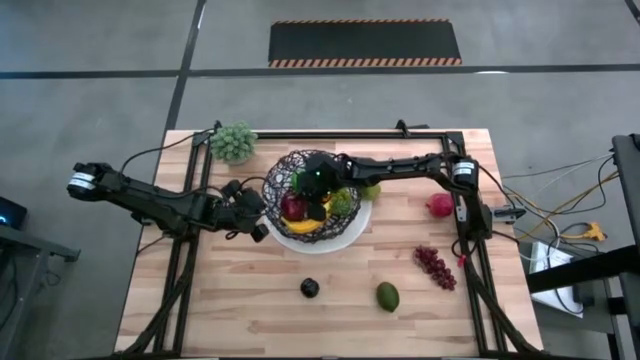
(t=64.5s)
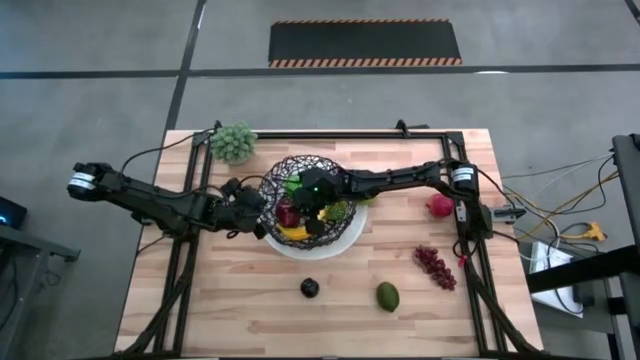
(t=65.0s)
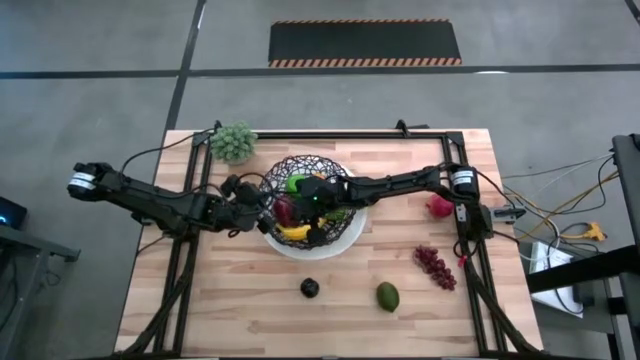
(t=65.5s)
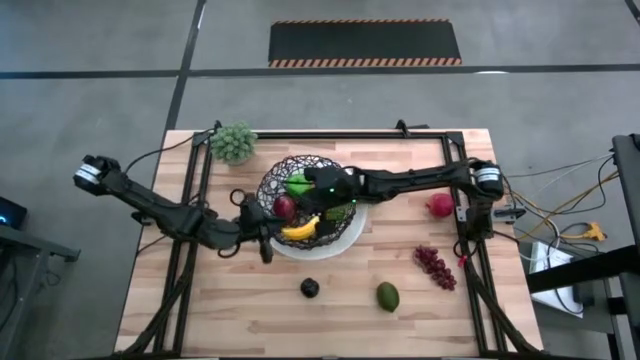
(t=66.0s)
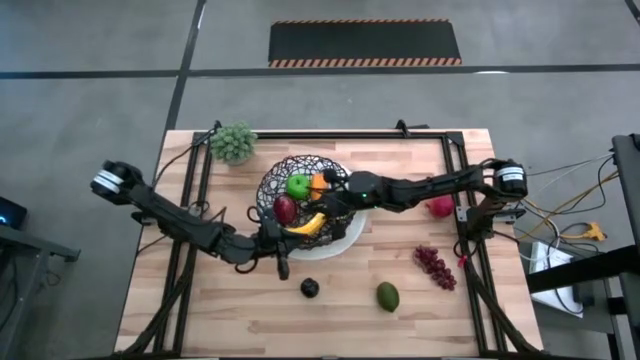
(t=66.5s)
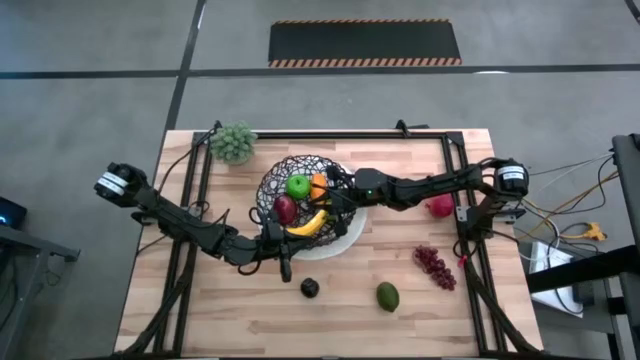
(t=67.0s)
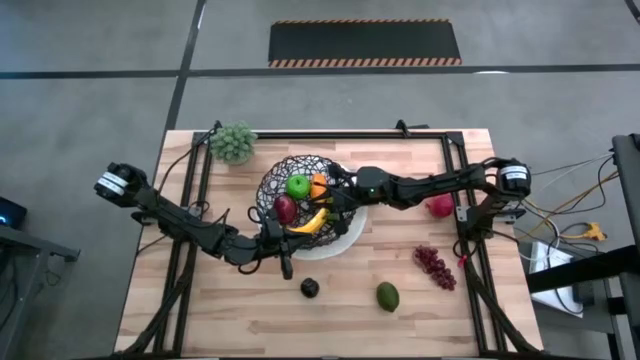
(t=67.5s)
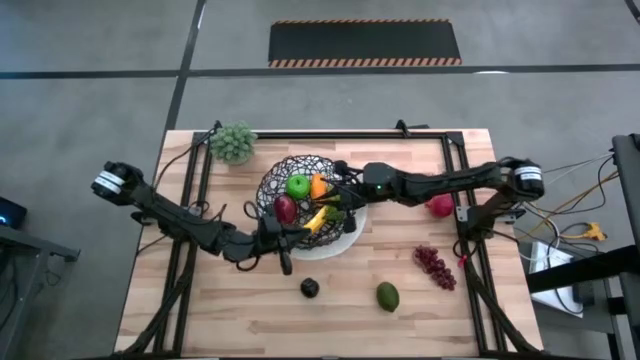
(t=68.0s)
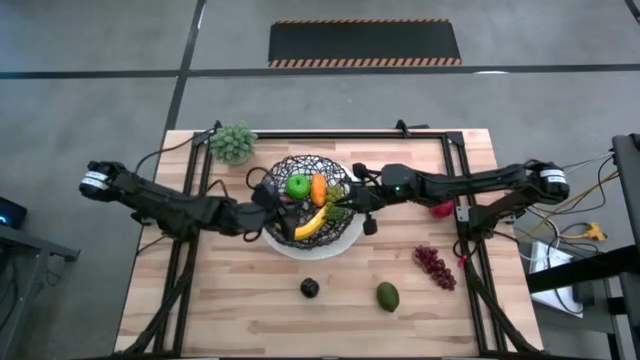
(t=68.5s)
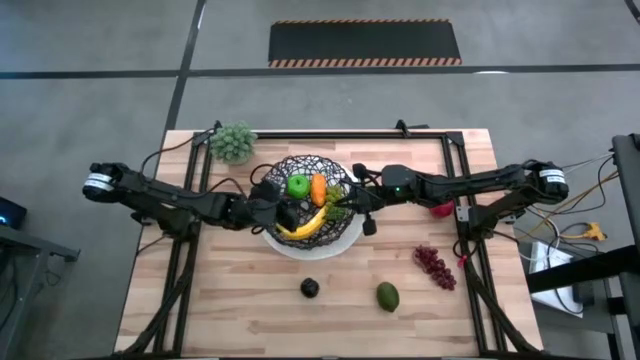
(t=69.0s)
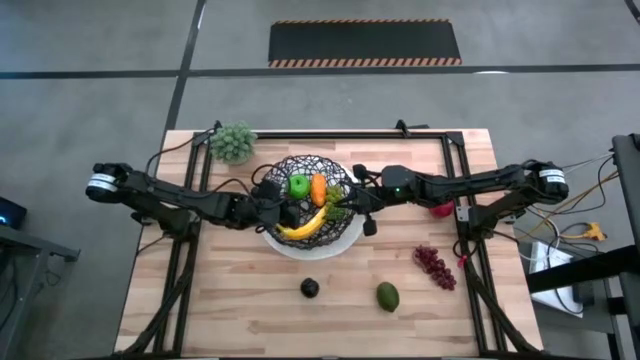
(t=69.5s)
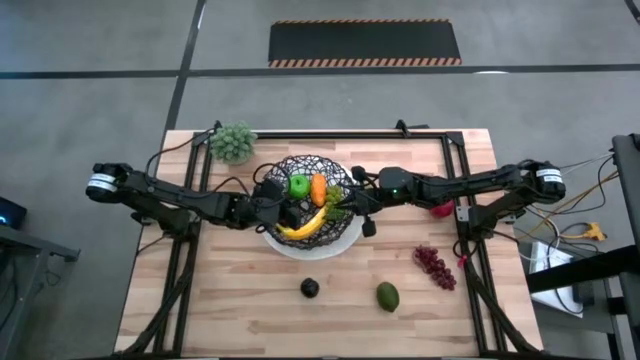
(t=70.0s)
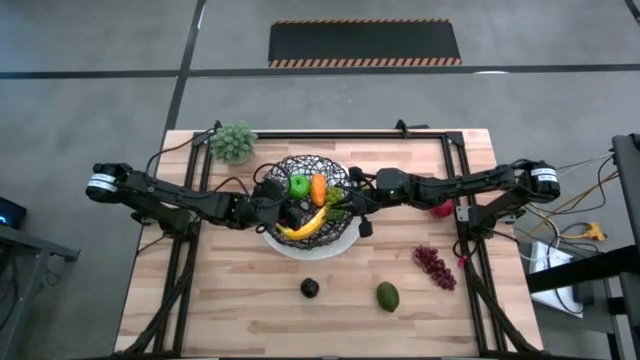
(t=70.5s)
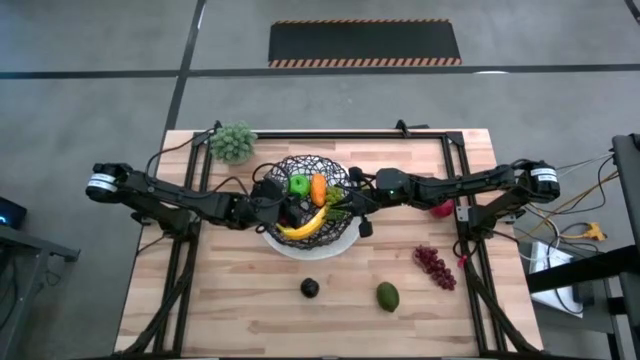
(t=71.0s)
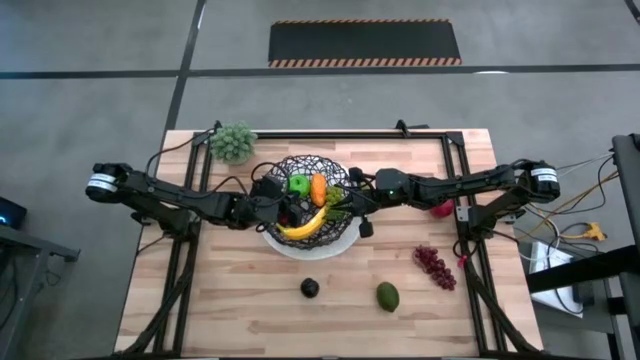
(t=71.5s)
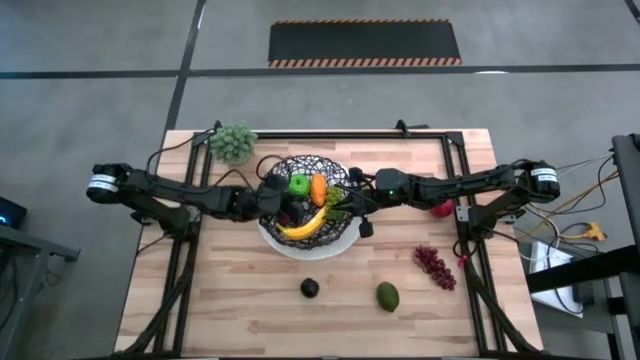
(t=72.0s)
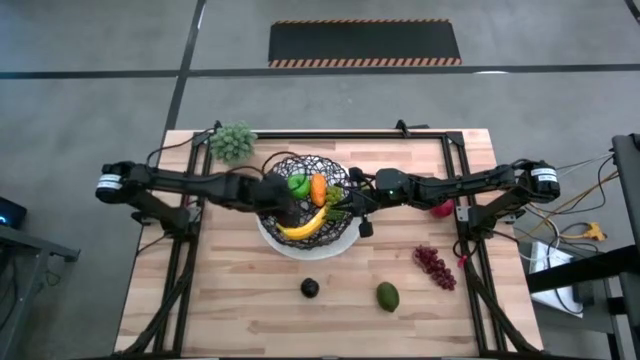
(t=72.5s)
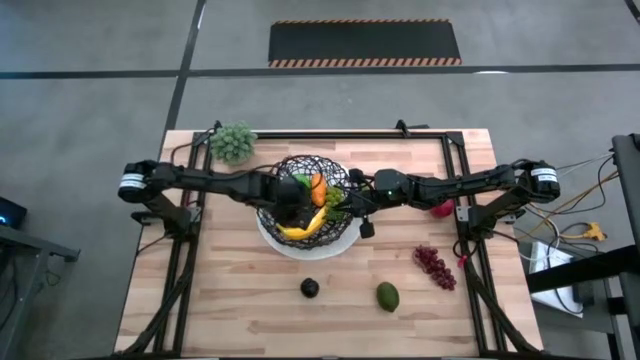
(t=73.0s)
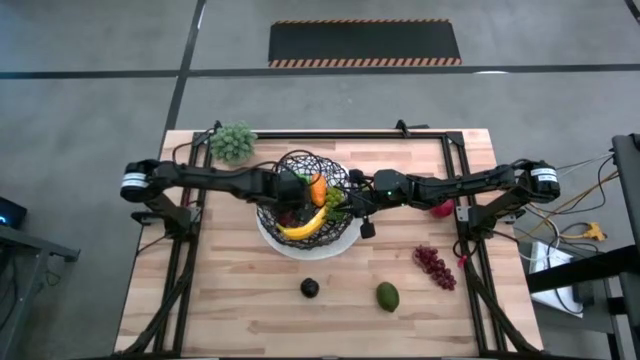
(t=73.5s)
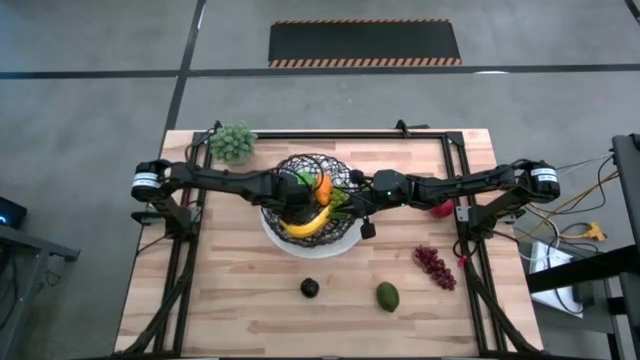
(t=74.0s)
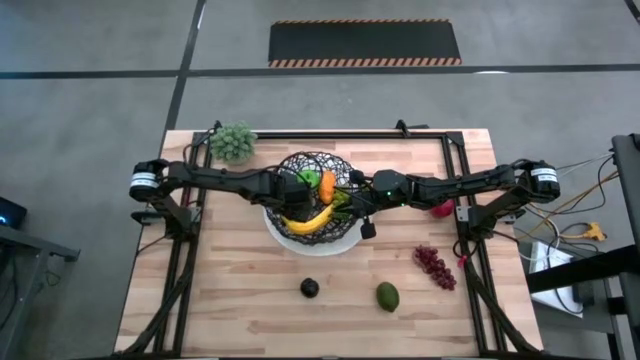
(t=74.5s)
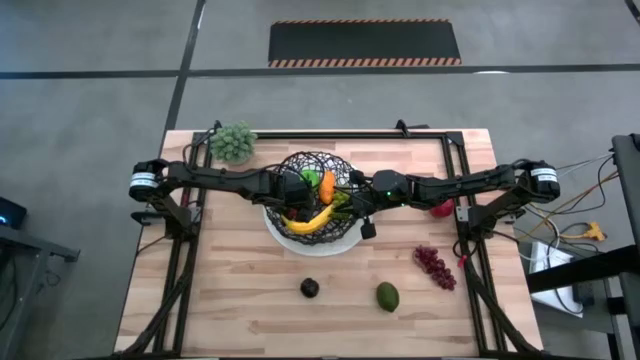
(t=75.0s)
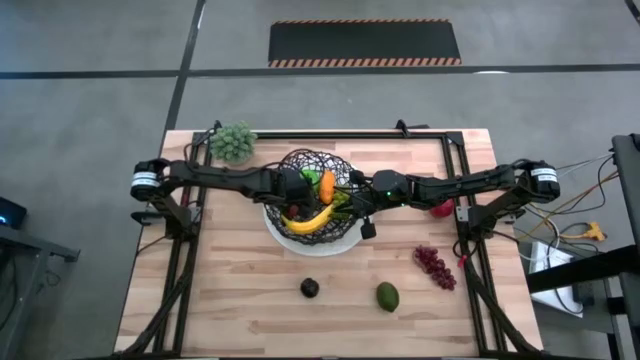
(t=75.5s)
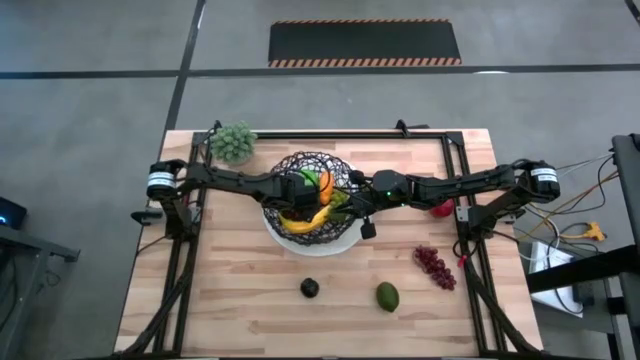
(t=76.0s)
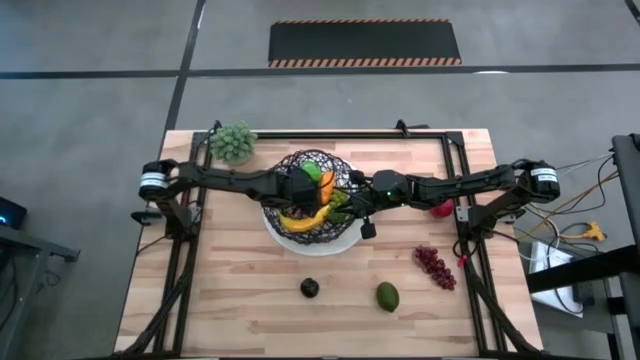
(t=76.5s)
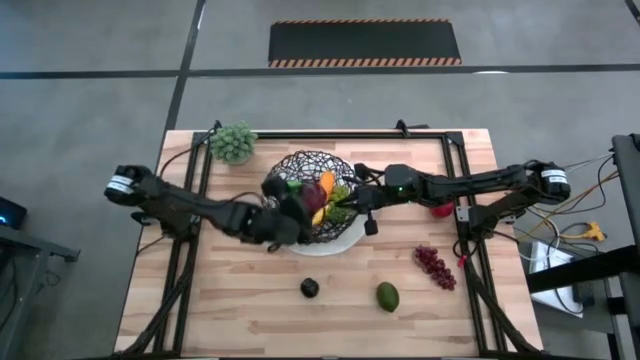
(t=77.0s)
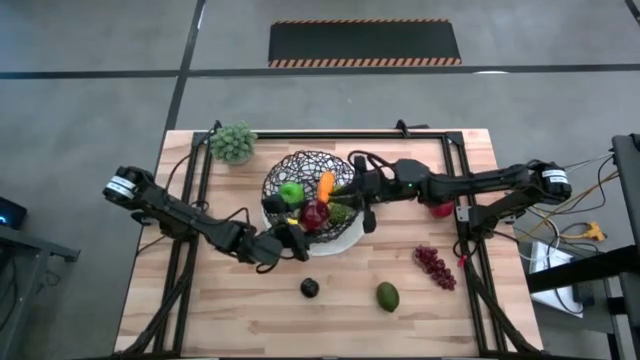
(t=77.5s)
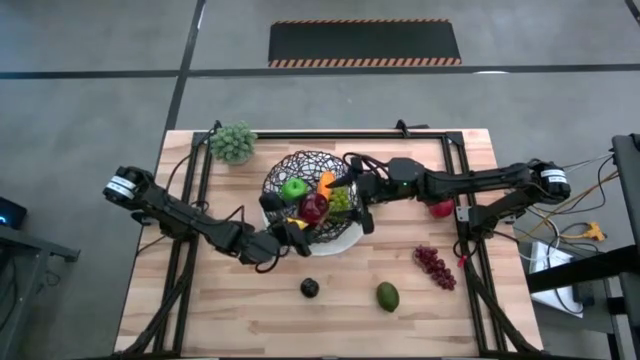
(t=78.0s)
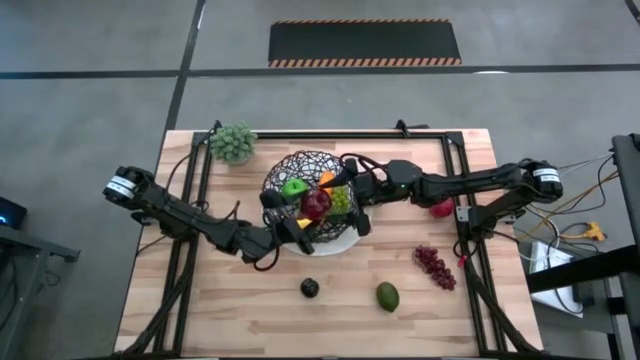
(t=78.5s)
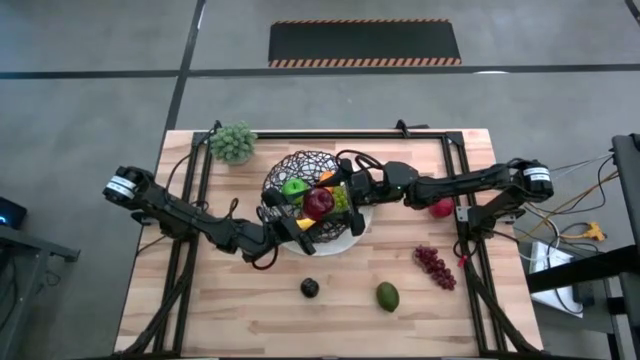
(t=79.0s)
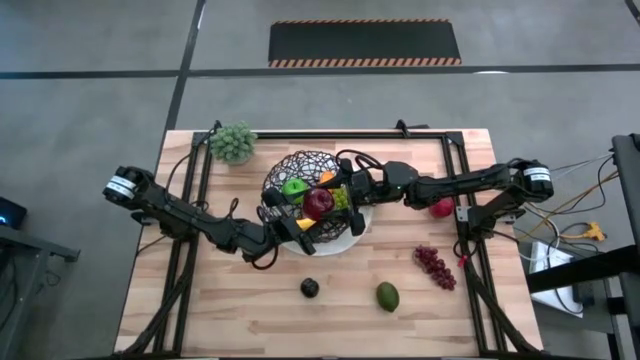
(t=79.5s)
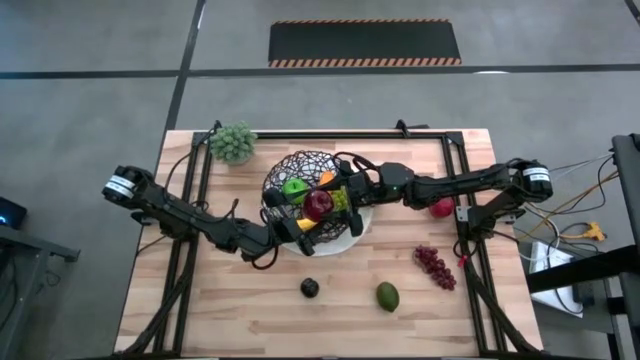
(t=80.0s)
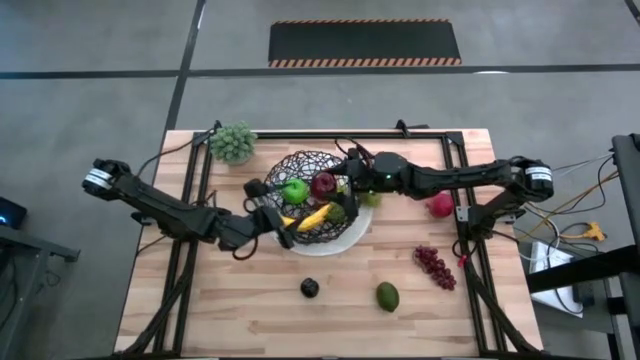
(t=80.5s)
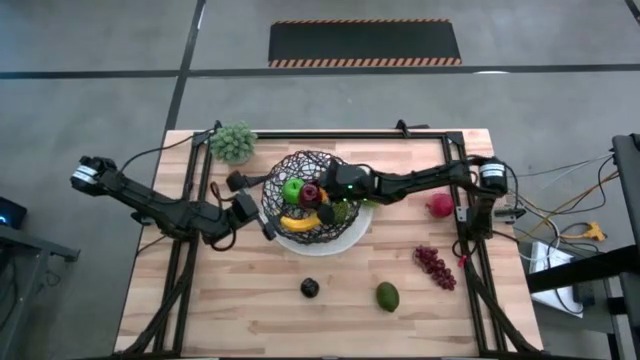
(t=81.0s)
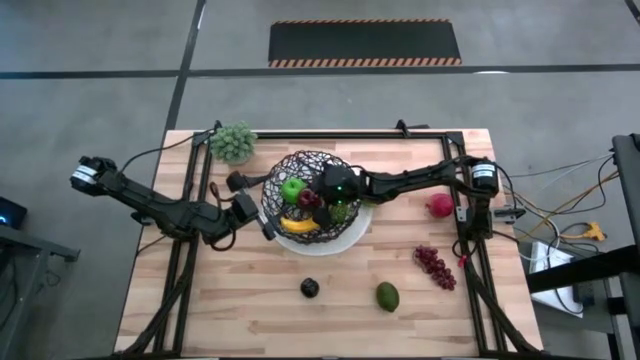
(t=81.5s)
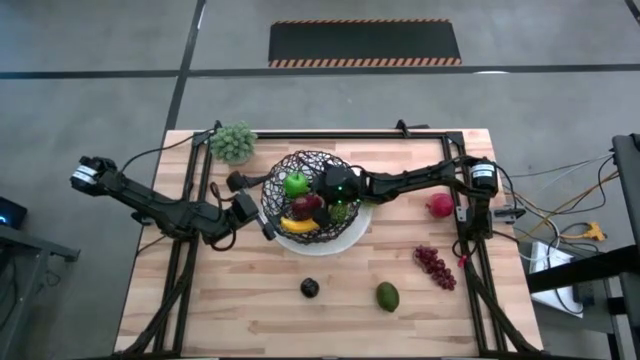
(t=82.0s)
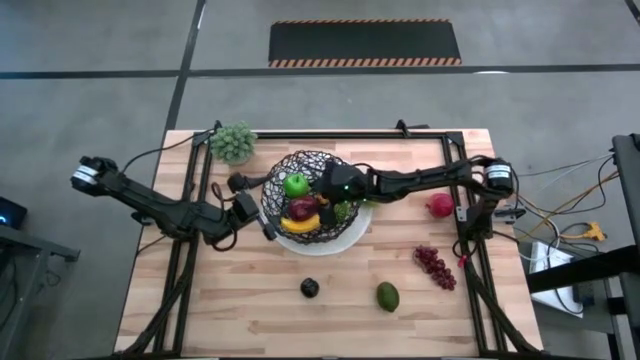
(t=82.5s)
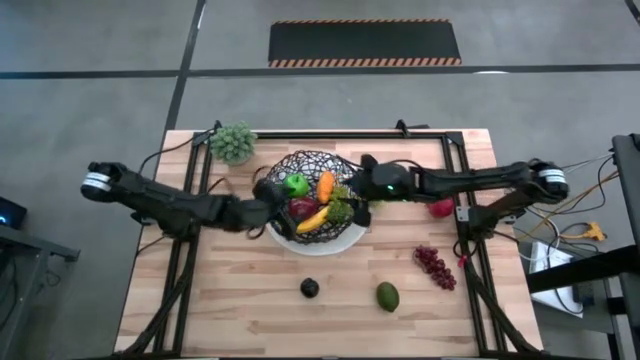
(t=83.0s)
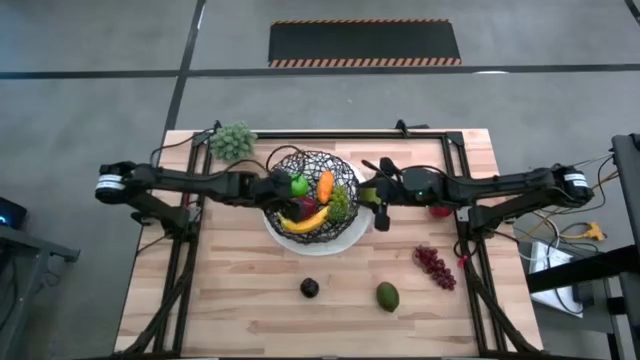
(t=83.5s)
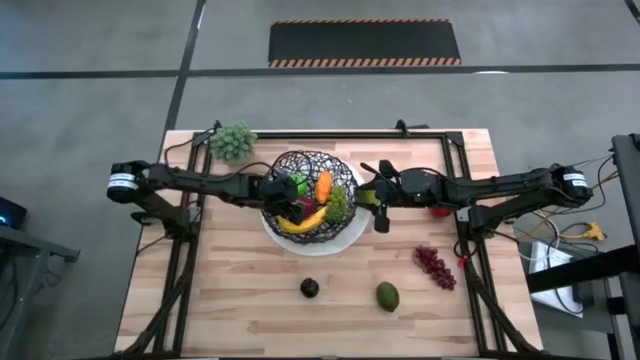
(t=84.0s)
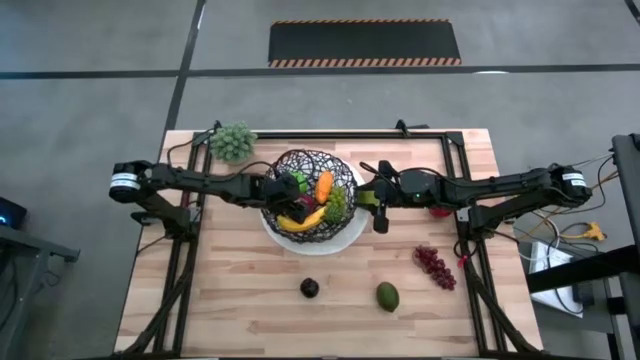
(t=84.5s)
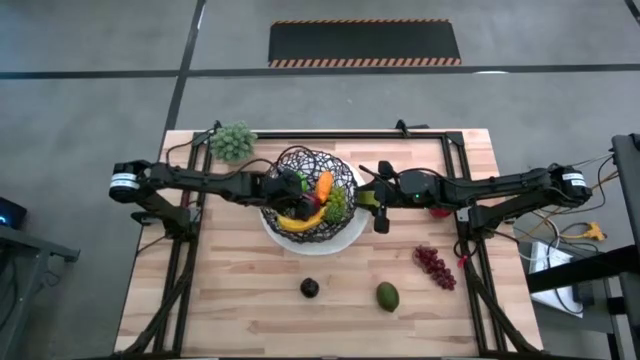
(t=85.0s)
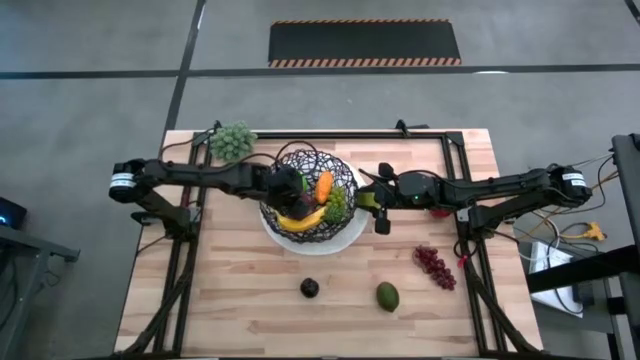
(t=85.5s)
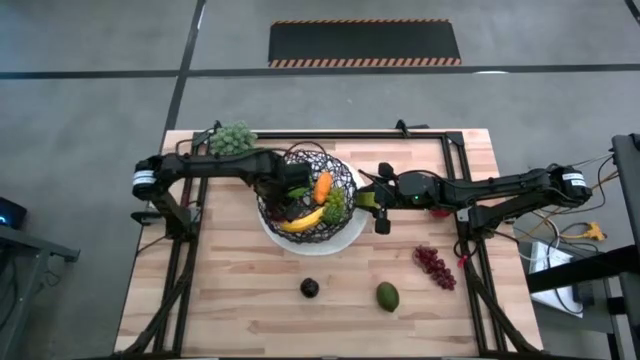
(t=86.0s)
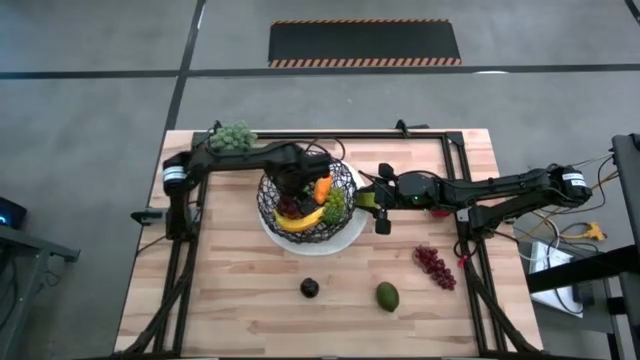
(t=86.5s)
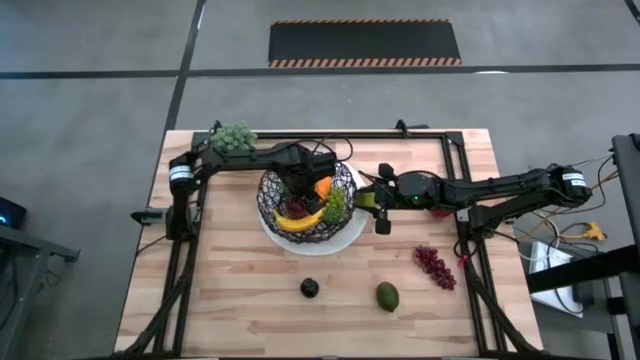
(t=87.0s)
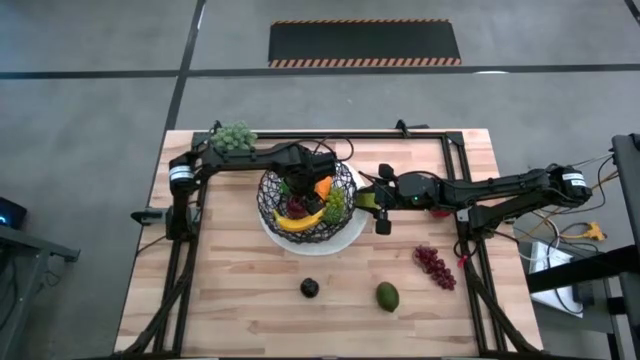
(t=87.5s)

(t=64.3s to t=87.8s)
Task: Build produce basket
Put the red apple into the wire basket
